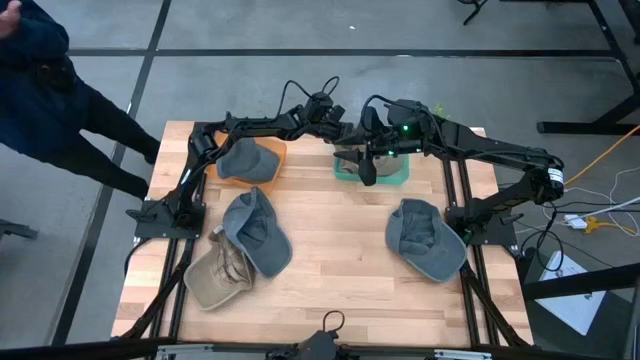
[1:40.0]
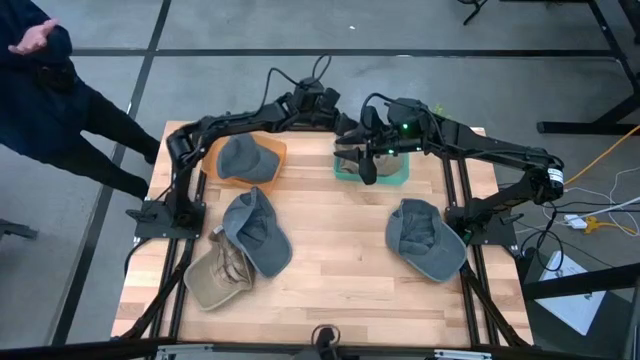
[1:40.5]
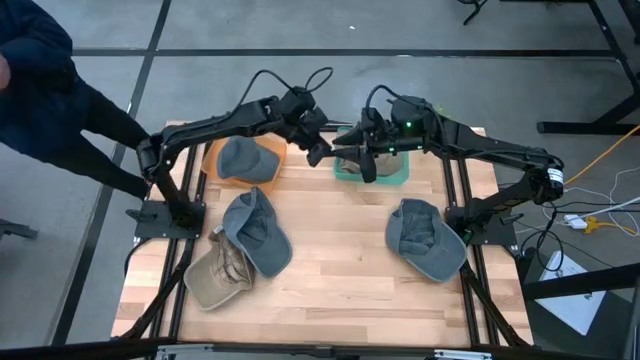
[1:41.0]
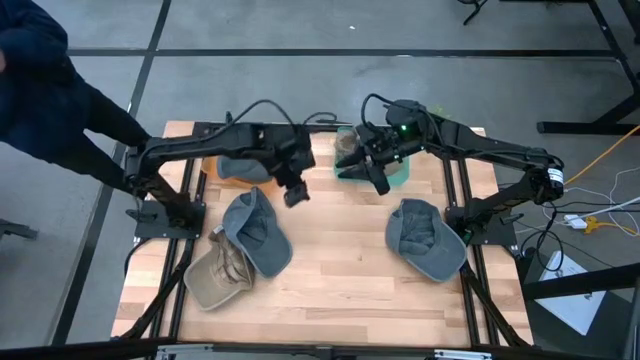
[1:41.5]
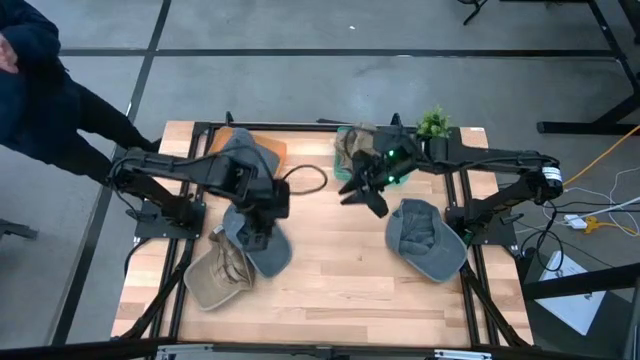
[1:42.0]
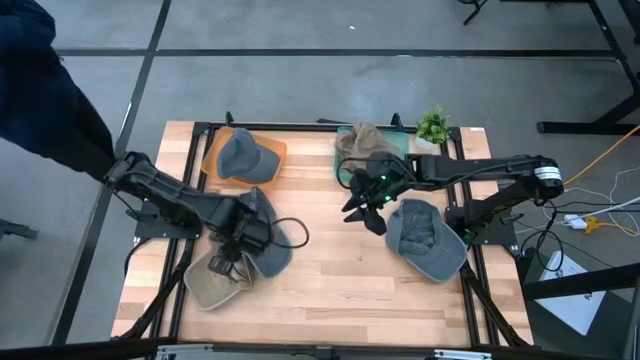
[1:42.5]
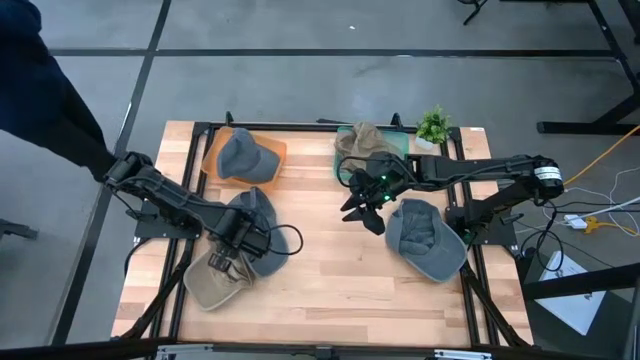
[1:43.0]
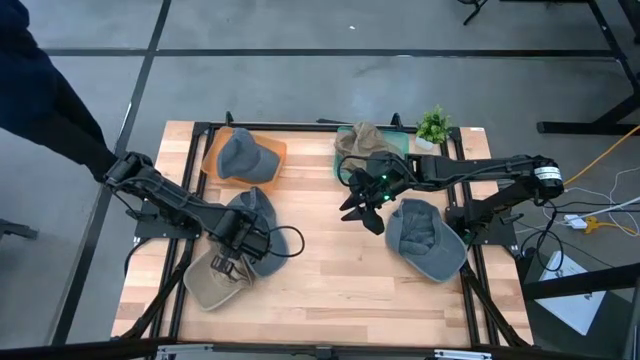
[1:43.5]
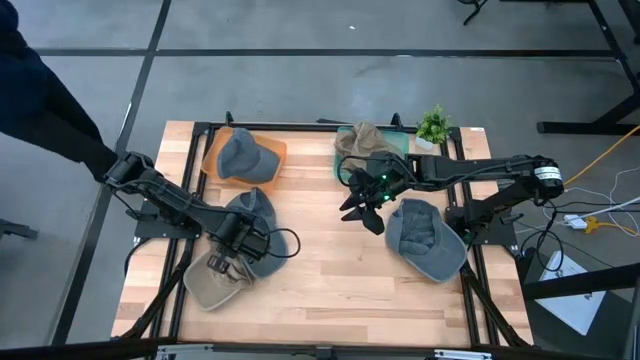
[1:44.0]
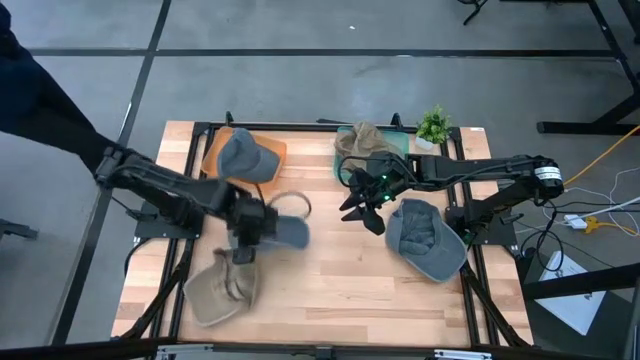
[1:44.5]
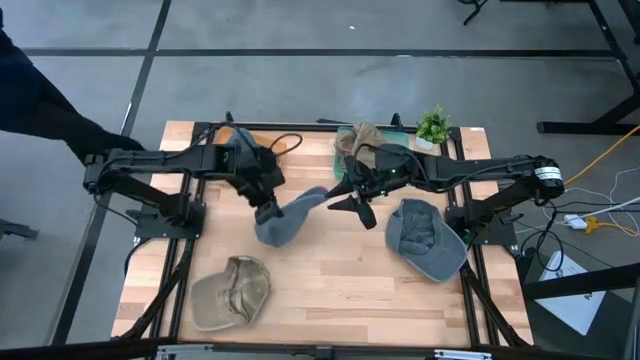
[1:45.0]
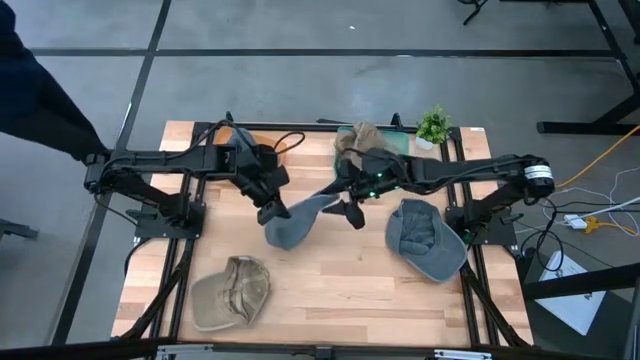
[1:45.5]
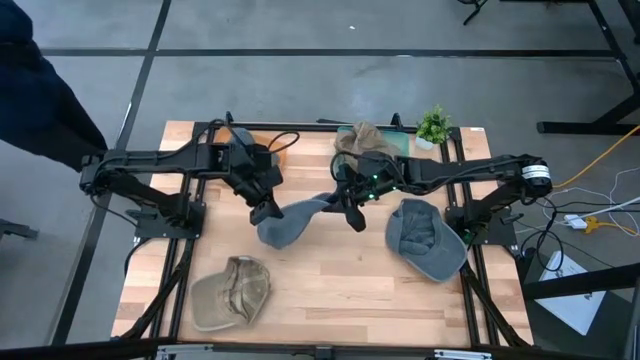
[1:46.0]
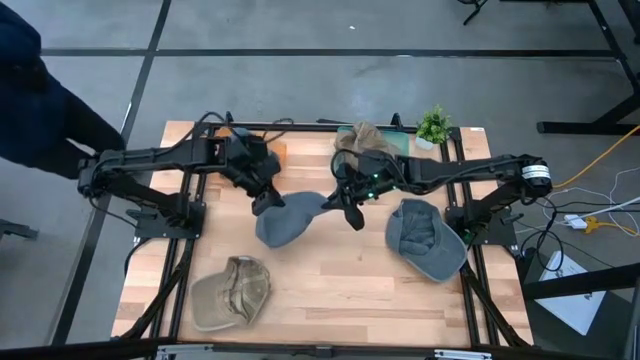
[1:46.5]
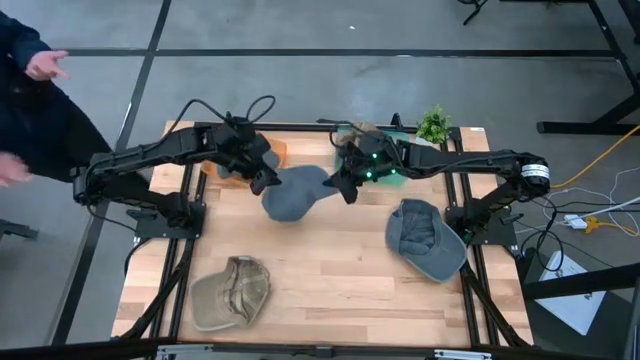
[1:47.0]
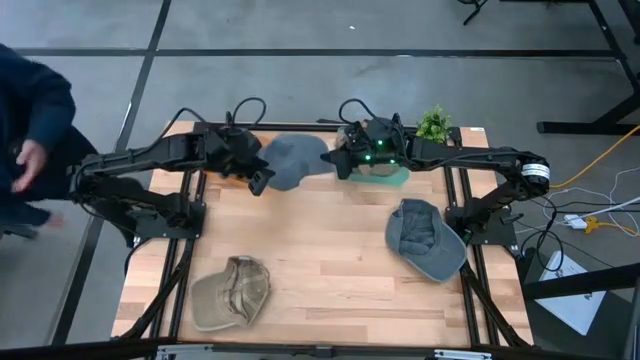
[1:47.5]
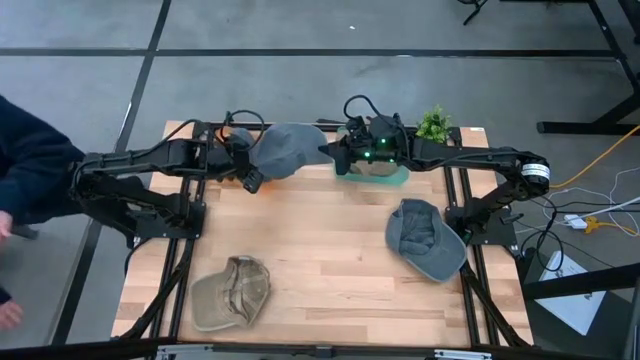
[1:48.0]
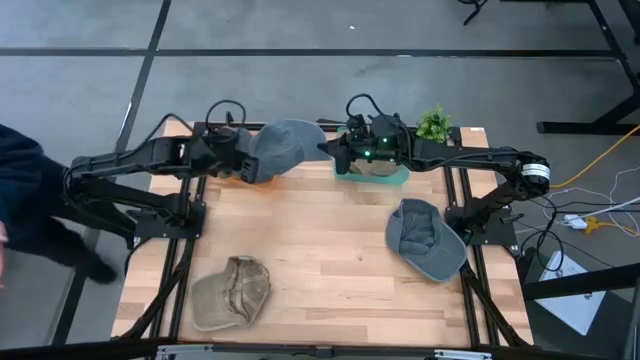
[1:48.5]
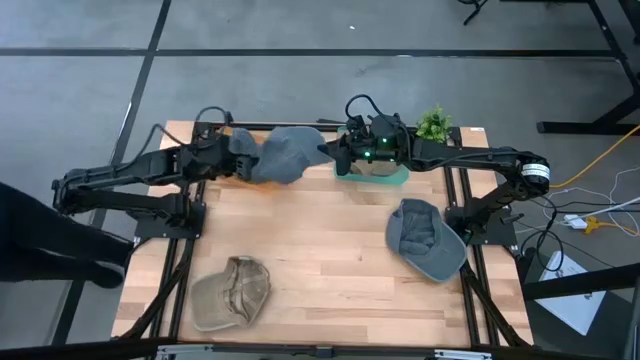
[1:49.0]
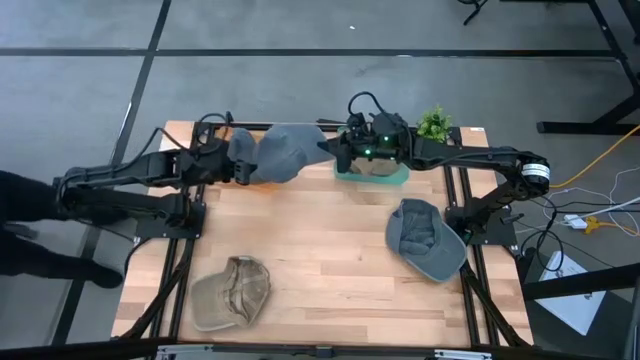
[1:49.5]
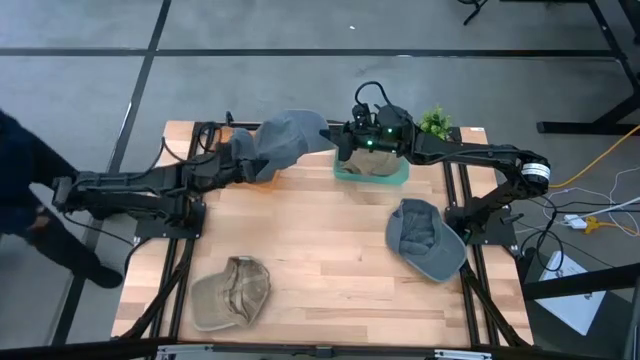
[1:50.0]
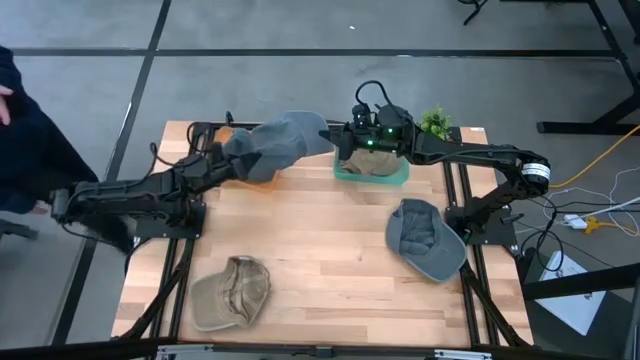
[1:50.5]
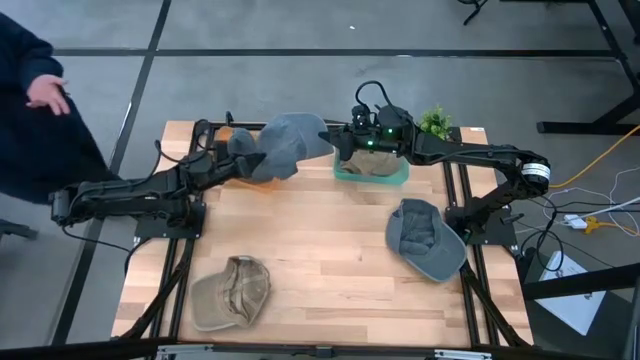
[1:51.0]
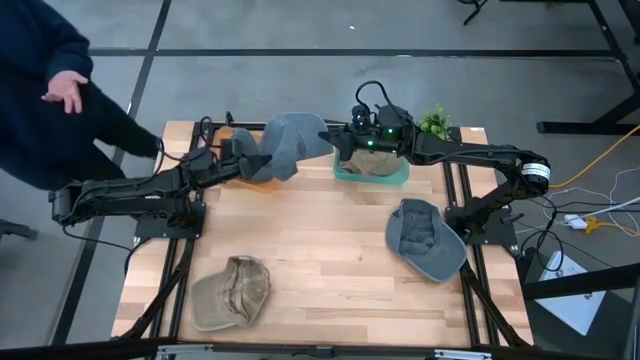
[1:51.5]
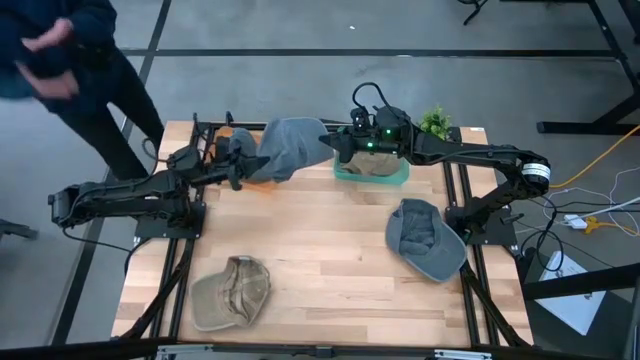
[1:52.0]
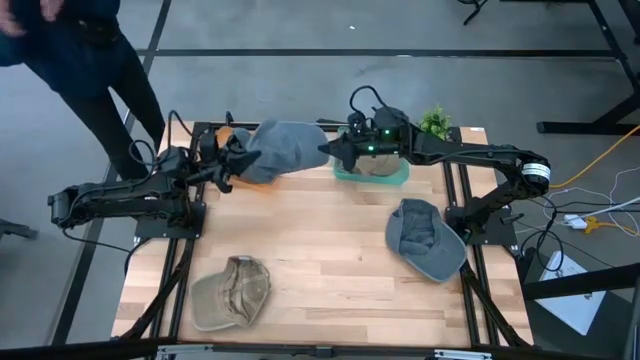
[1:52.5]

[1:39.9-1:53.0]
Task: Pick & Place hat
Put the left gray cap into the orange bin

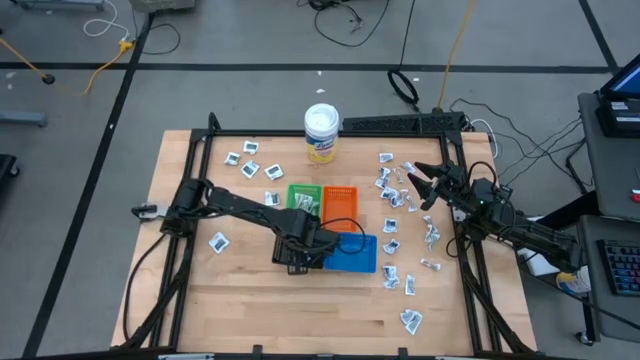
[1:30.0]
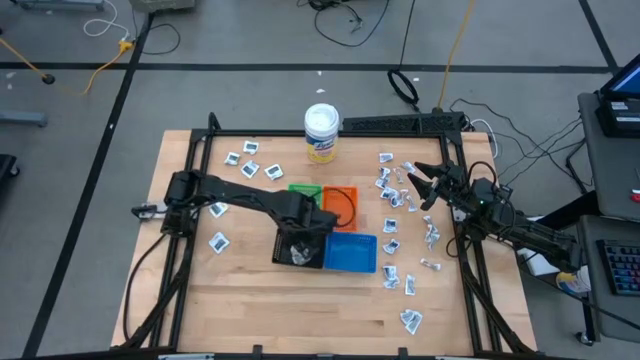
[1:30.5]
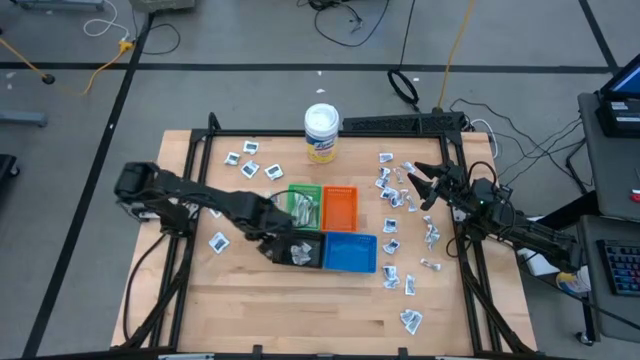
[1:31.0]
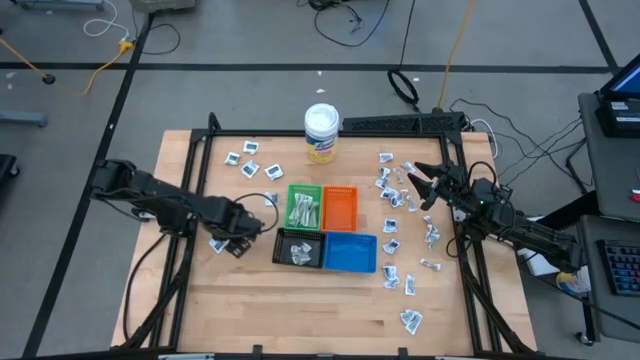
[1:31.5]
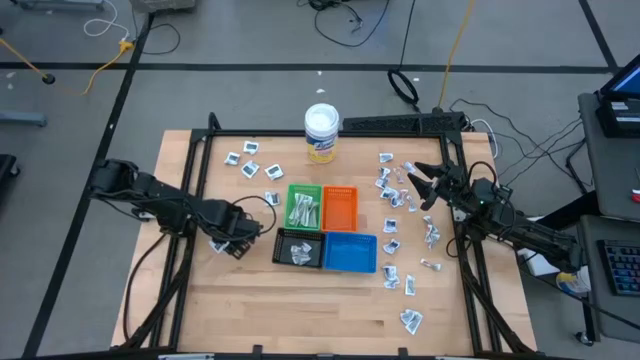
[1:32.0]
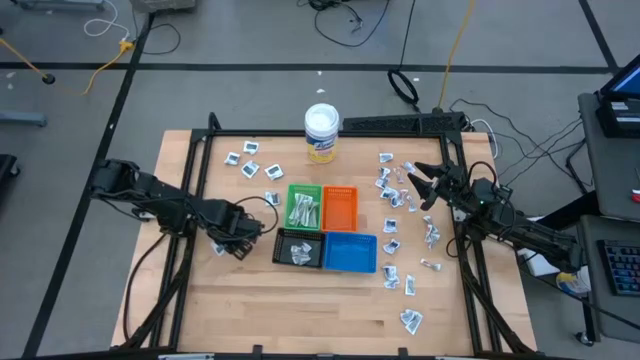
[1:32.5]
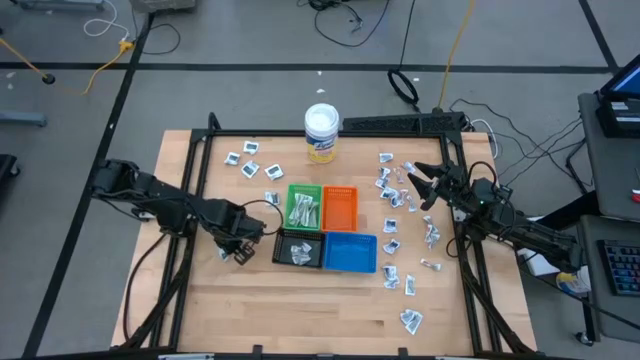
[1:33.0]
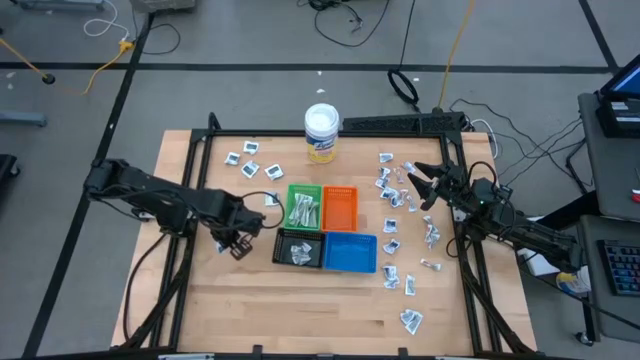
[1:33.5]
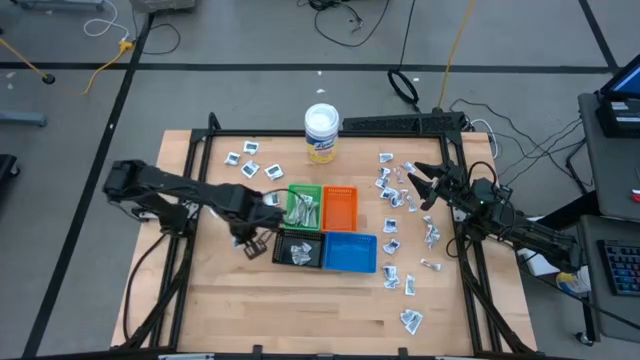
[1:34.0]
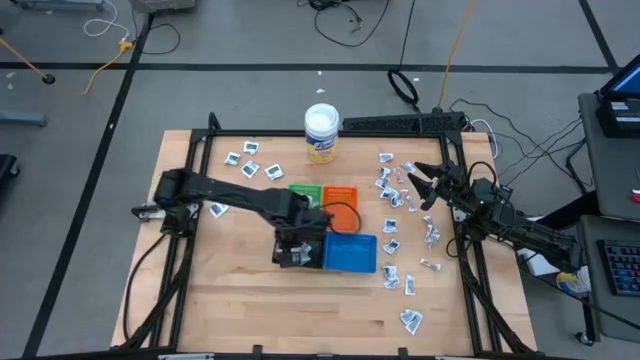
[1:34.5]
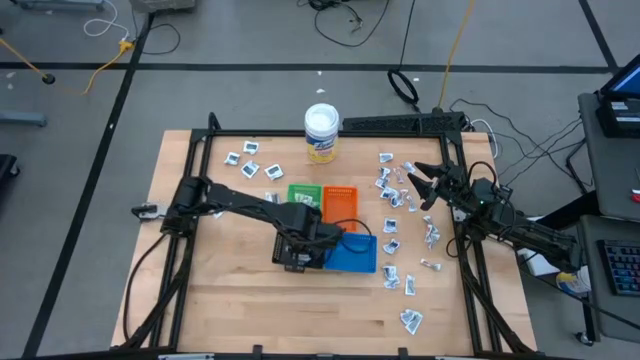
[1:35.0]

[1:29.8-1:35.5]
Task: Pick & Place First Aid Supplies
Put the towelette pack into the black bin

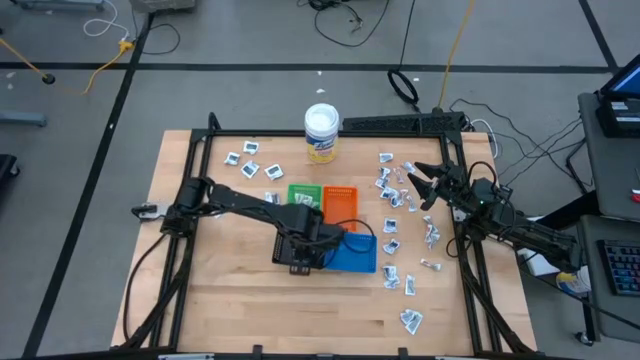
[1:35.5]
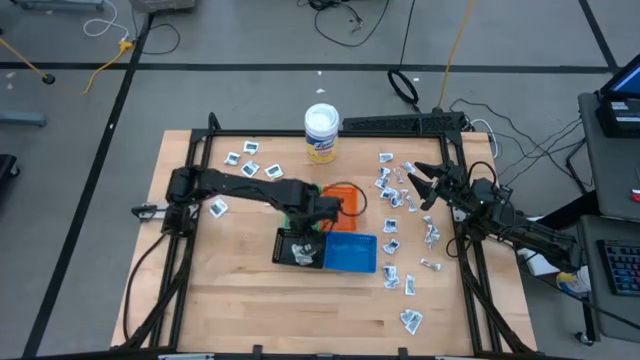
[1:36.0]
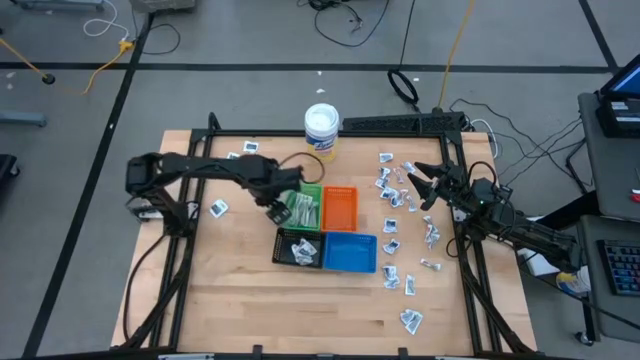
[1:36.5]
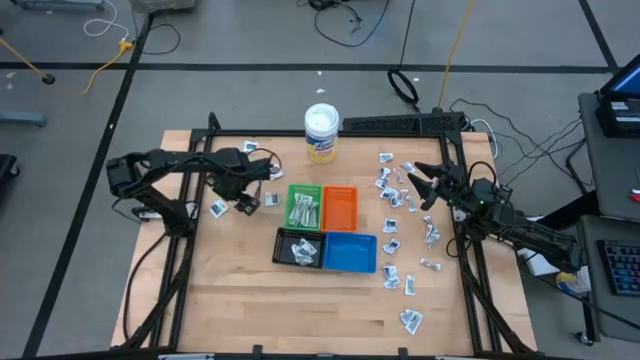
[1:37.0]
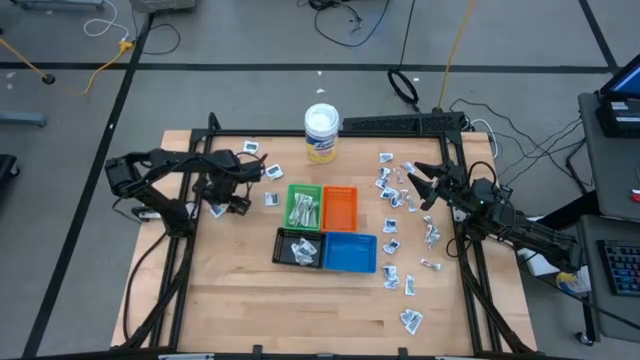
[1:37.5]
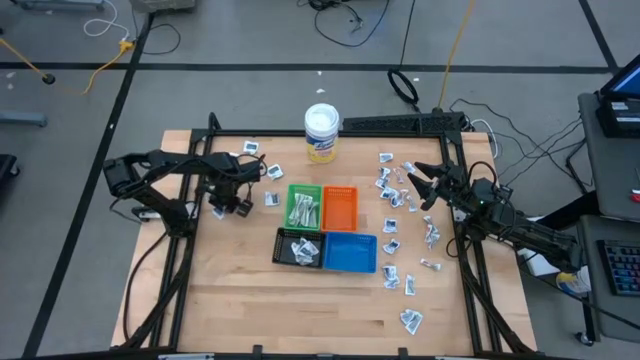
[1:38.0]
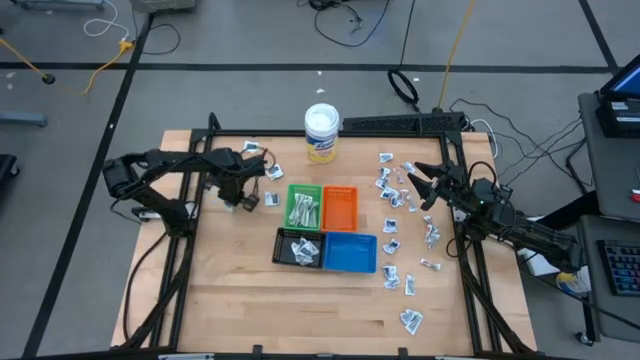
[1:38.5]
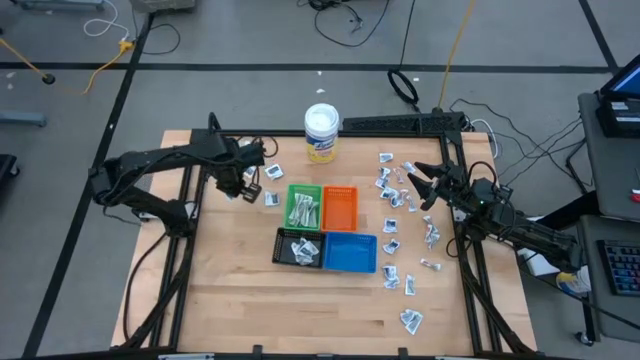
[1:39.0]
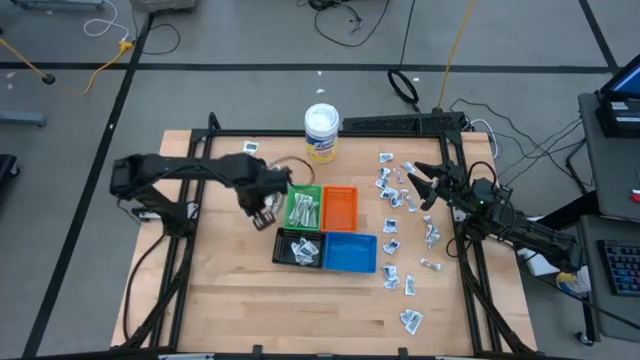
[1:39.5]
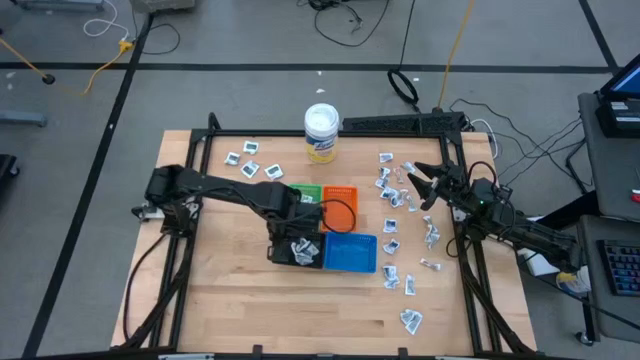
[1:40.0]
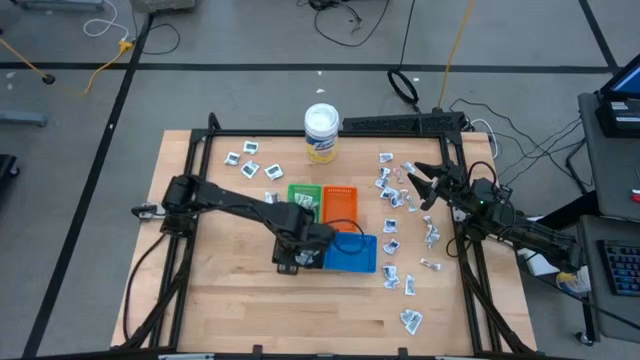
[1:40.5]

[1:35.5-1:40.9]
Put the towelette pack into the black bin
